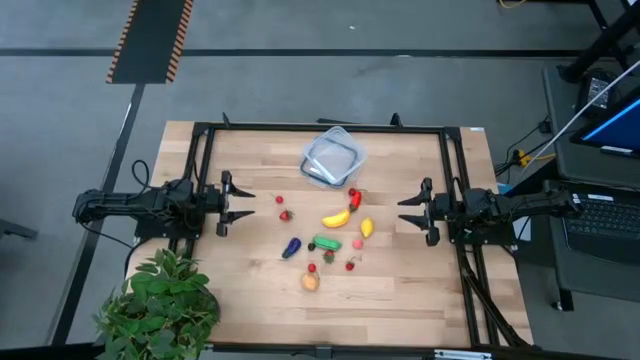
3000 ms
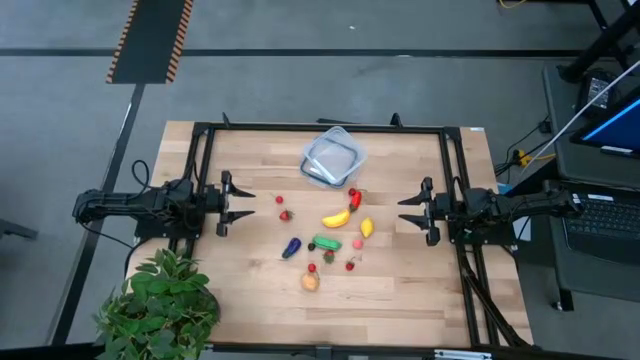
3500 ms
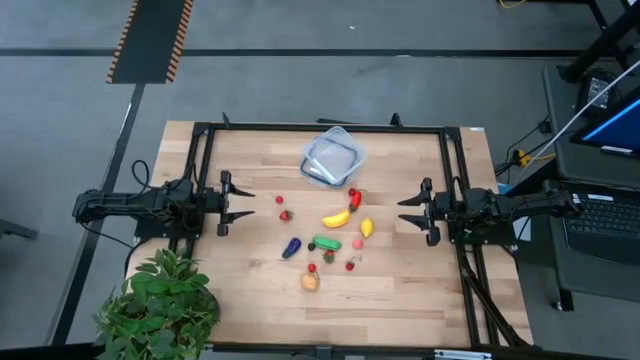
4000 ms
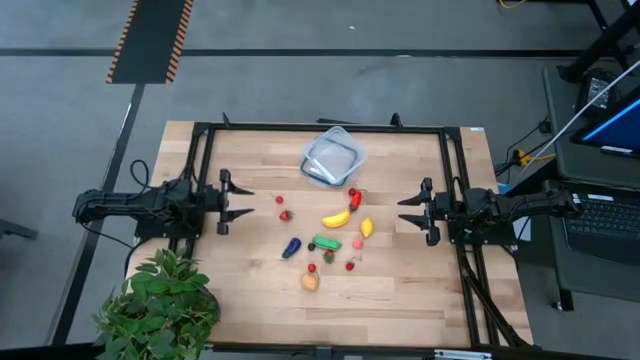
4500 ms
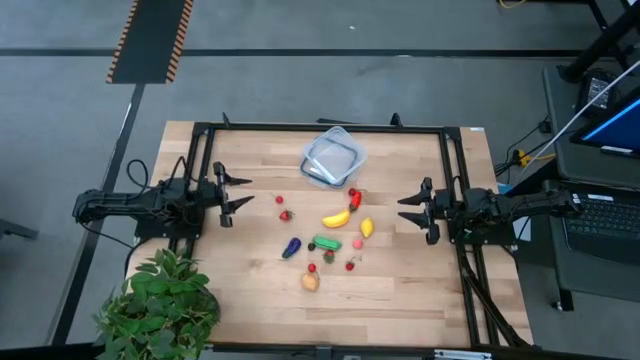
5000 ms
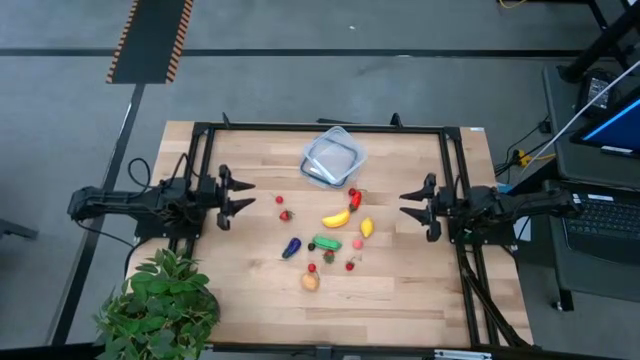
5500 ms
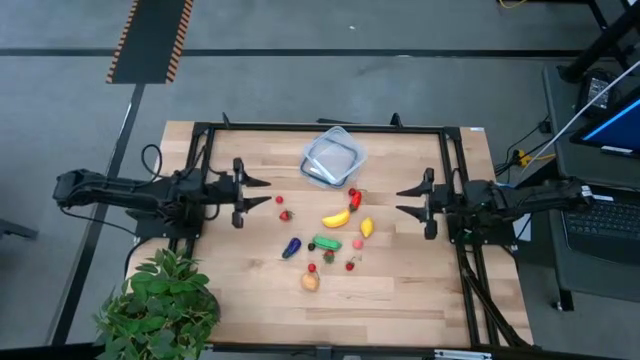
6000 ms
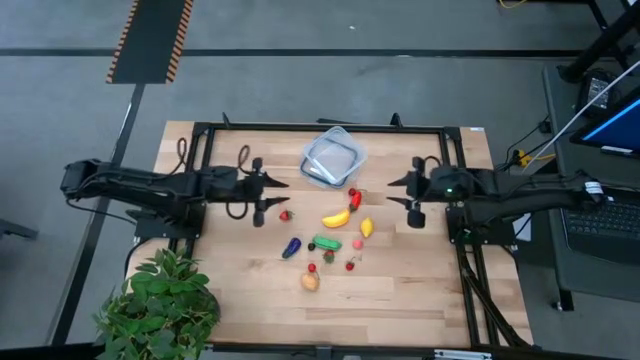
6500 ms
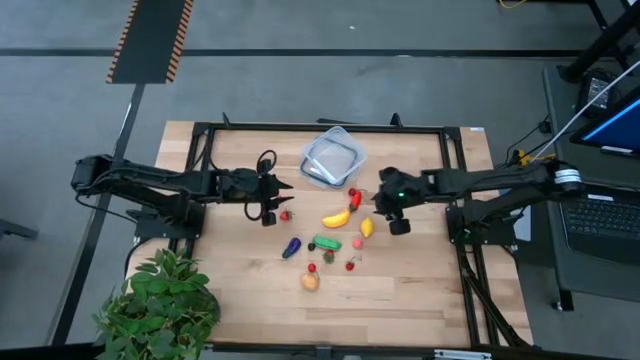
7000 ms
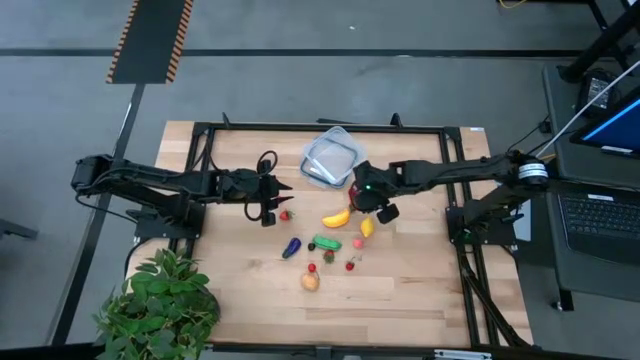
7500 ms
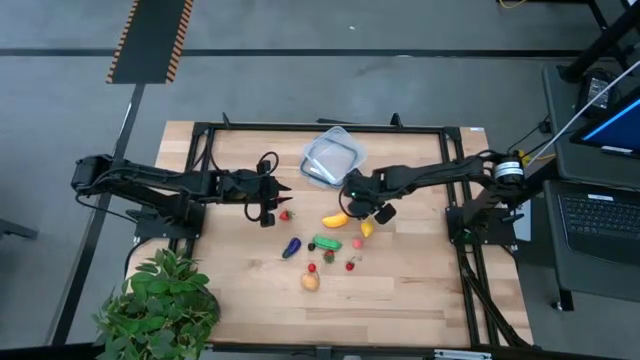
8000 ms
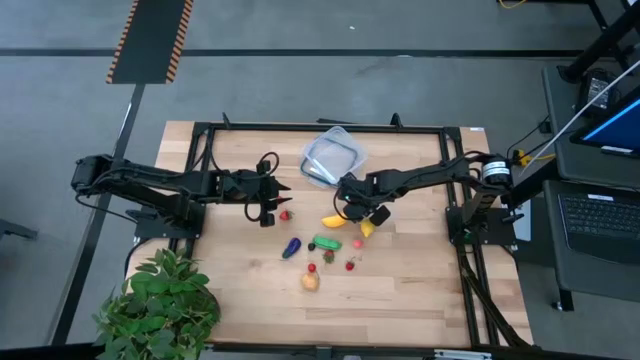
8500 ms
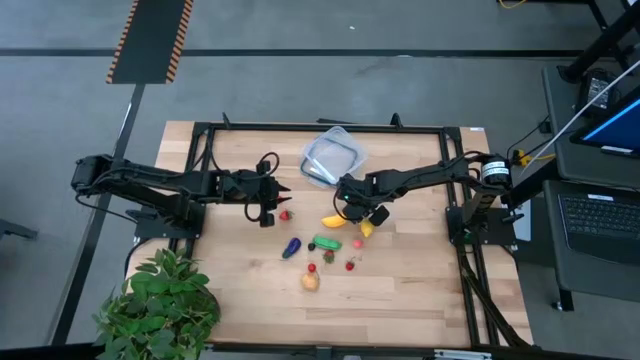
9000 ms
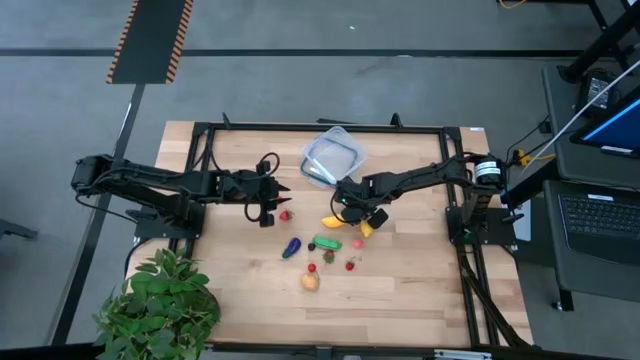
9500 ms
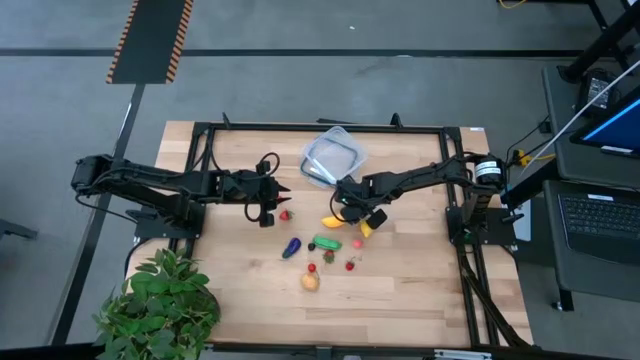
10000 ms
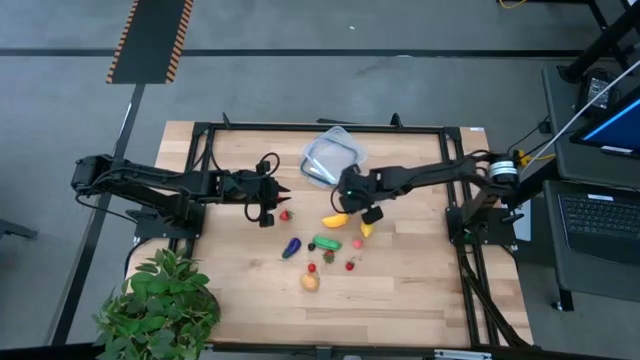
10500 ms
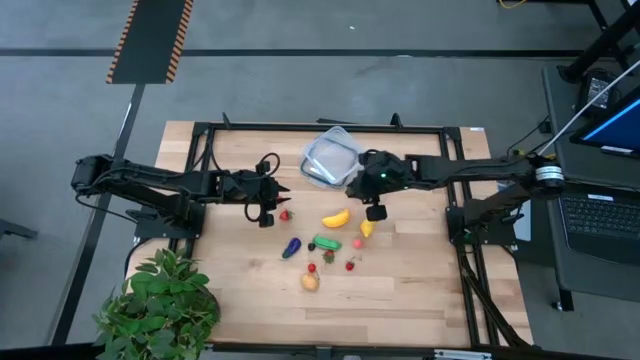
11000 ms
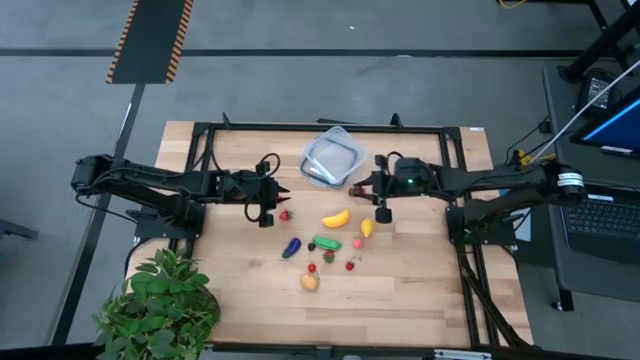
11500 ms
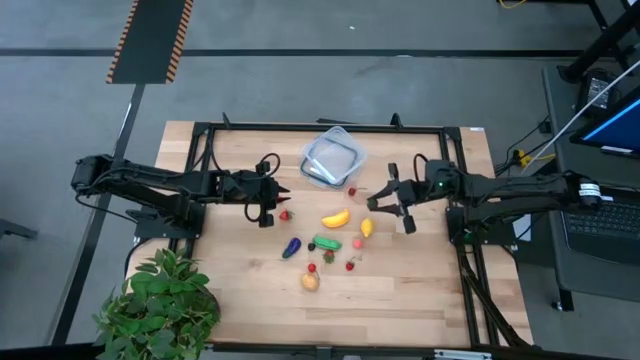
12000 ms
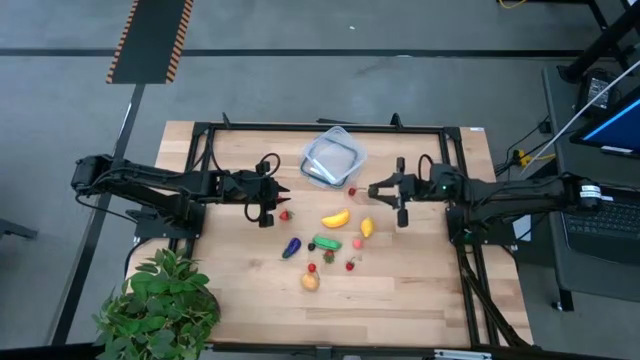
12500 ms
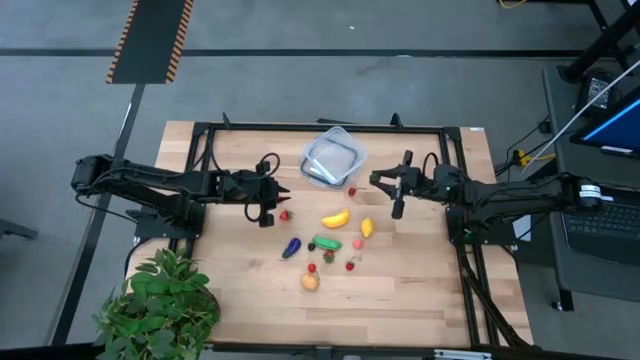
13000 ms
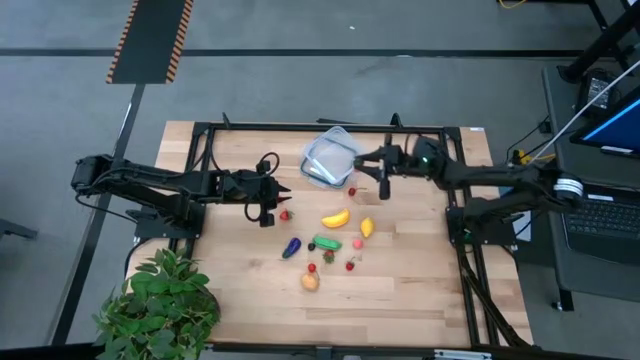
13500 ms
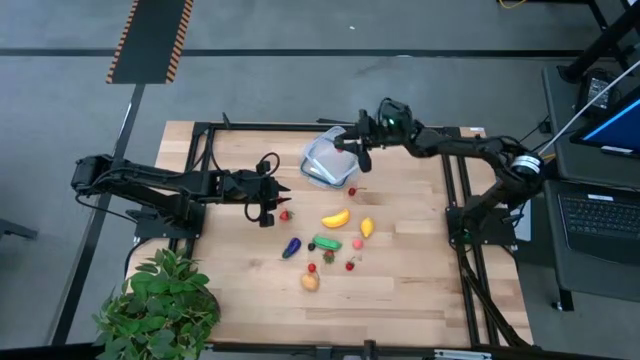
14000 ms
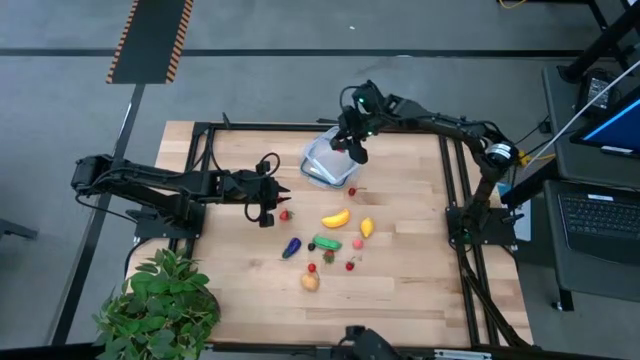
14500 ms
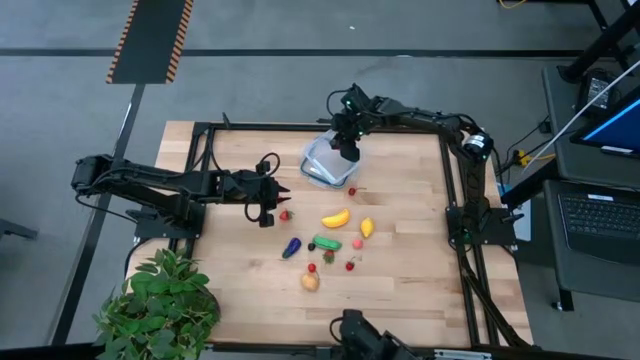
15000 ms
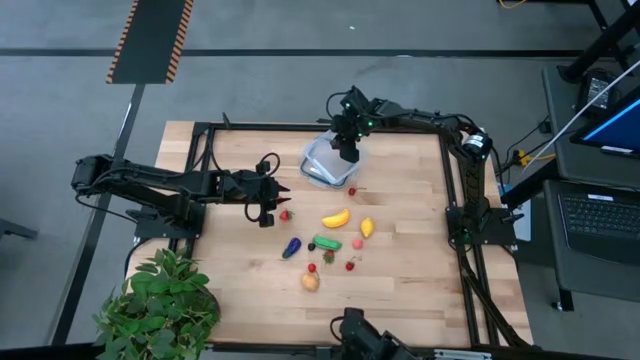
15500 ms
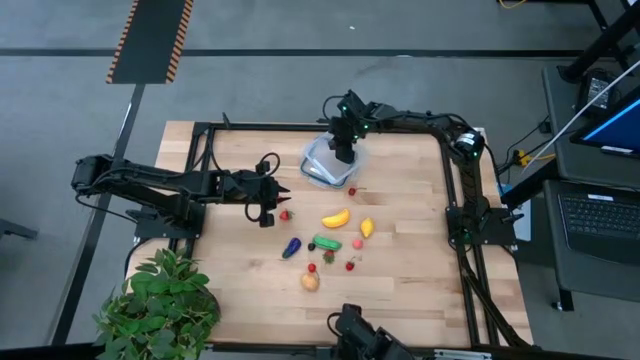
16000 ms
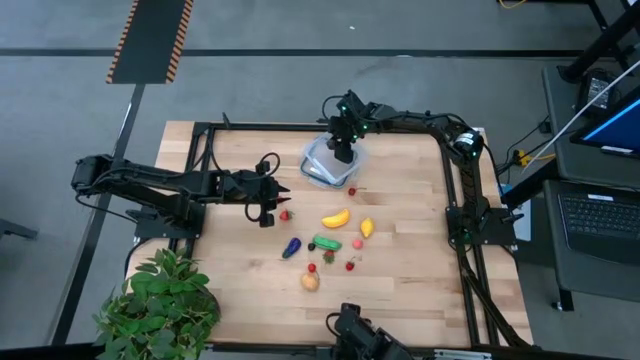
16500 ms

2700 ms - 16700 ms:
Task: Pick and placing Produce into tupperware
Put the red chili pepper into the transparent container

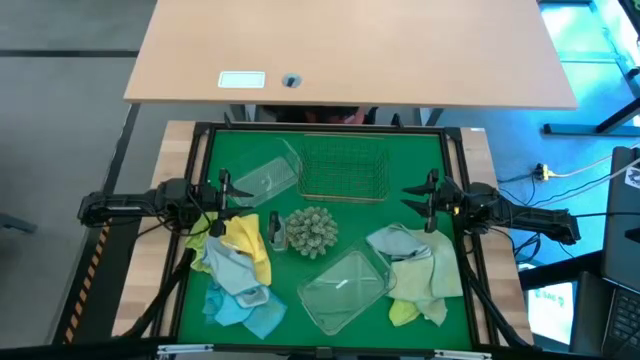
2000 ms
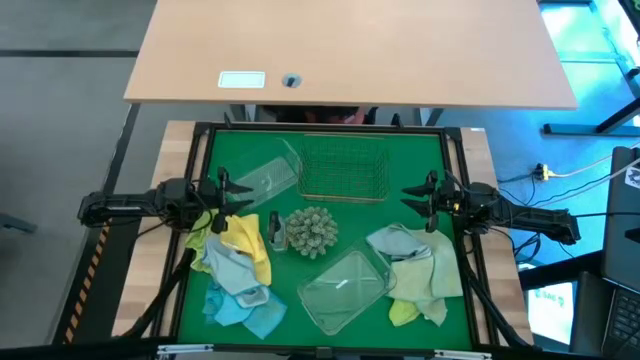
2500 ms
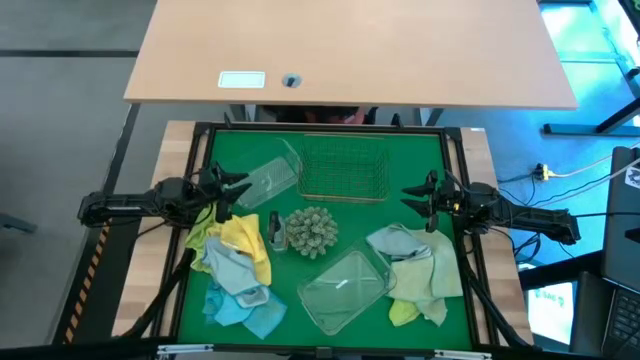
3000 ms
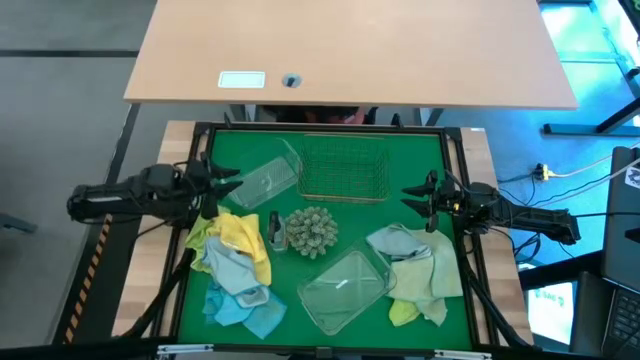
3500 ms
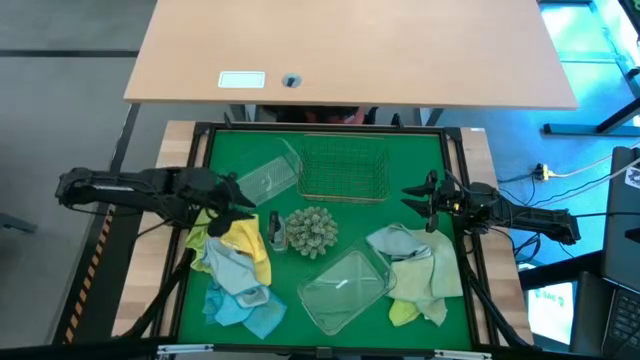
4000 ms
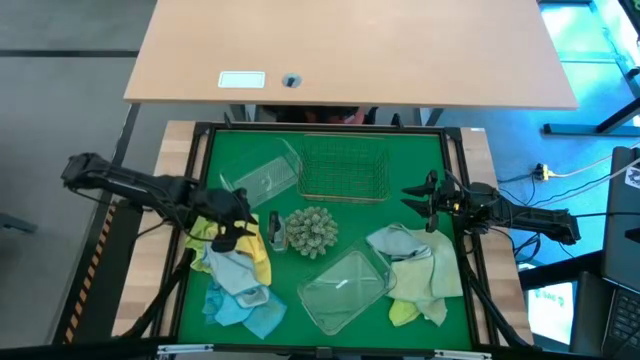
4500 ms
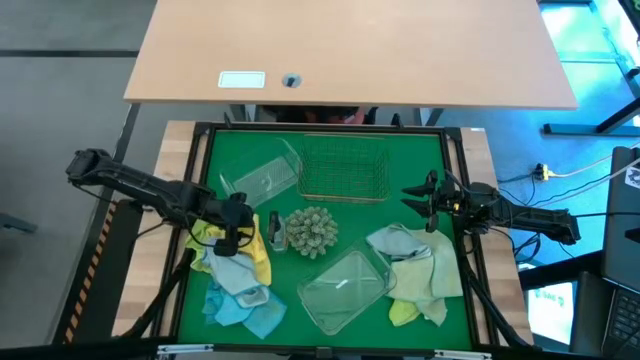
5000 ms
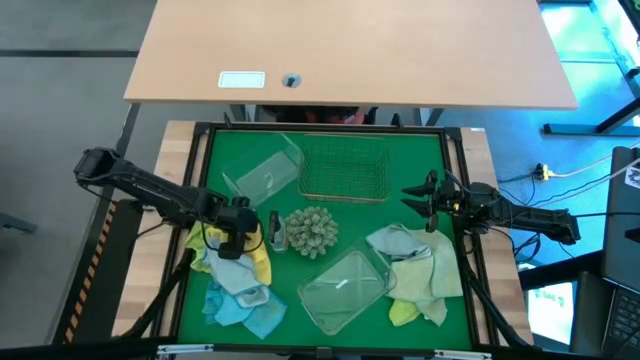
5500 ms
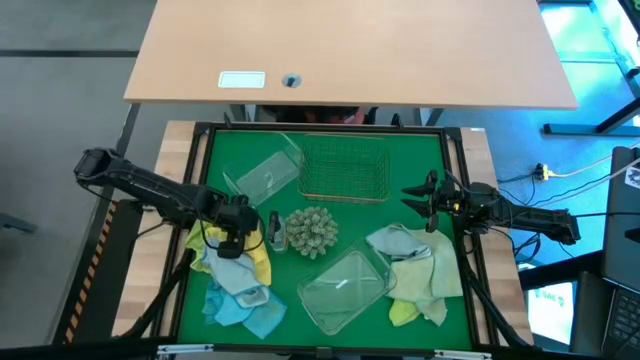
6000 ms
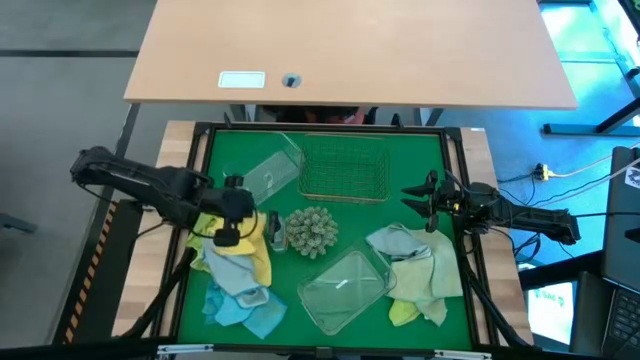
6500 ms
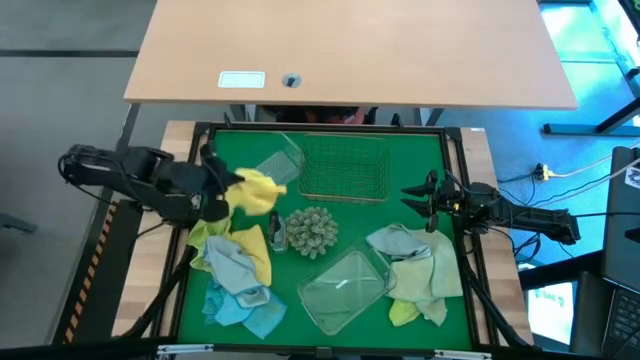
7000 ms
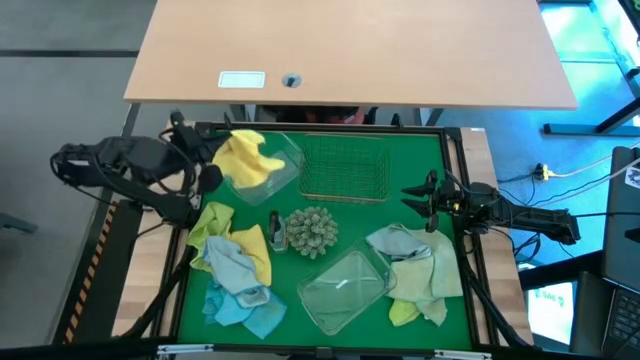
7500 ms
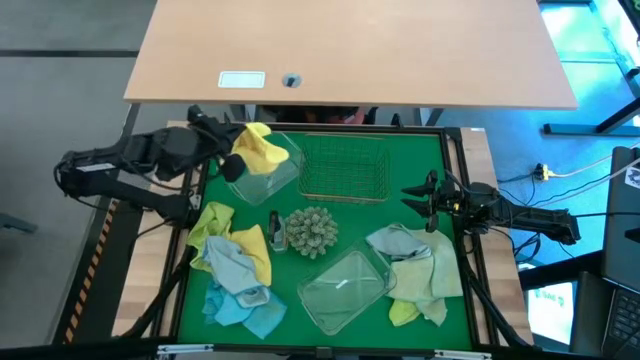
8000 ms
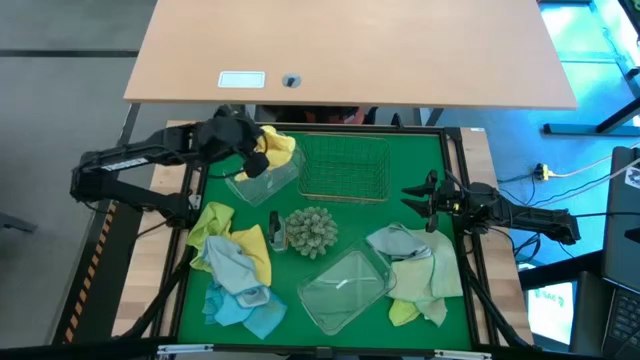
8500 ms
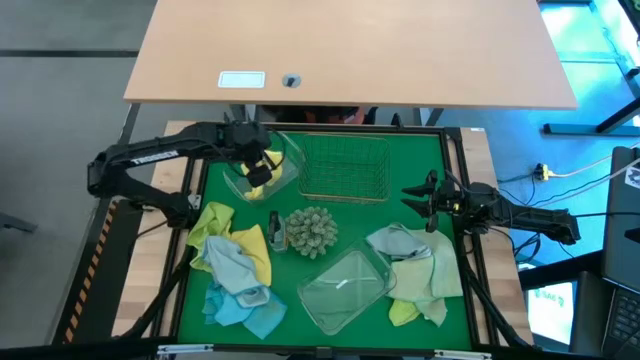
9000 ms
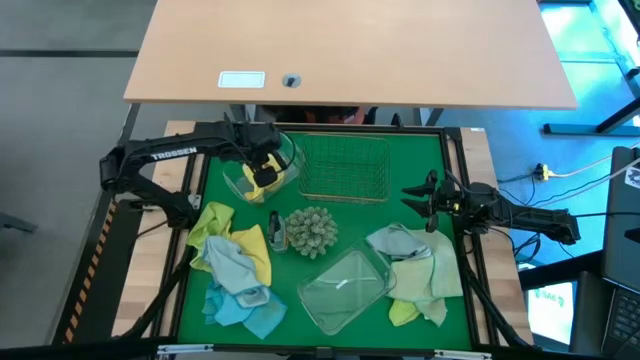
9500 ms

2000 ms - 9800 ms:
Task: Sort microfiber towel by color & place in baskets
Put the top yellow microfiber towel into the top transparent bin
